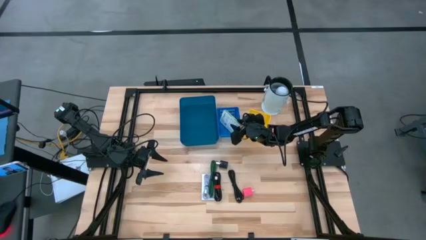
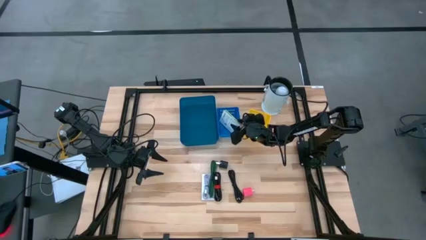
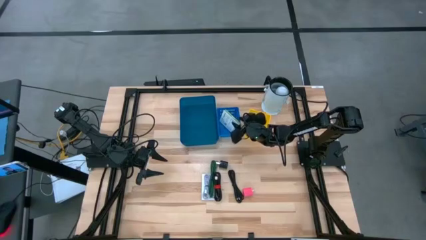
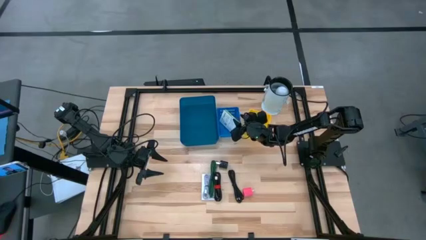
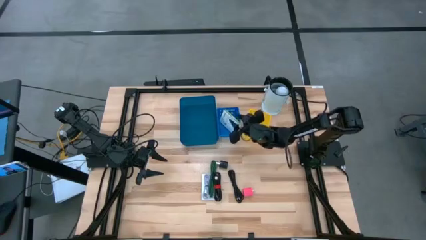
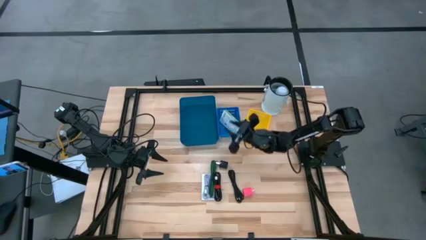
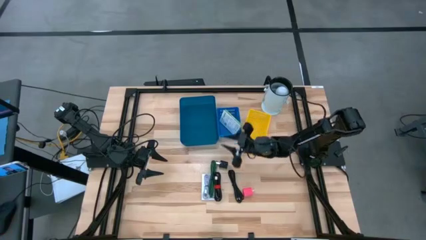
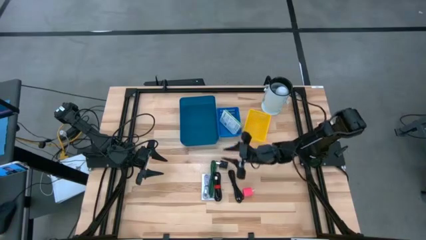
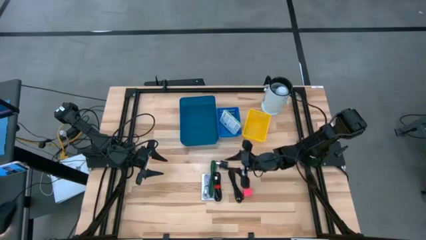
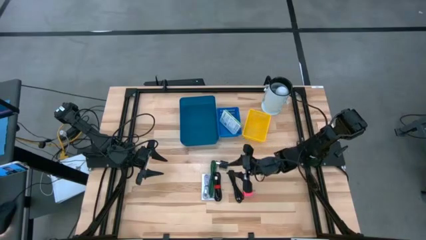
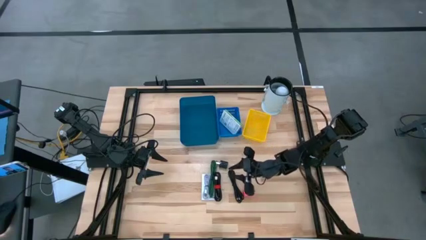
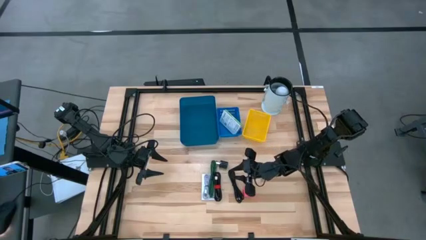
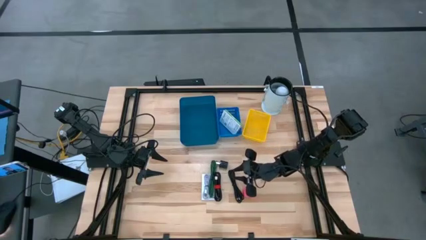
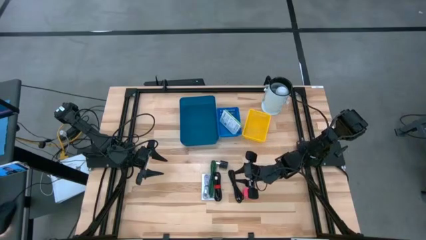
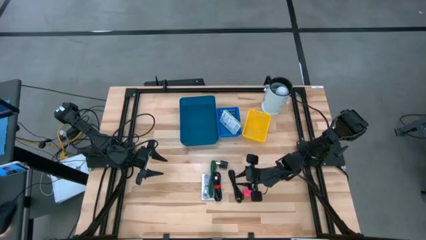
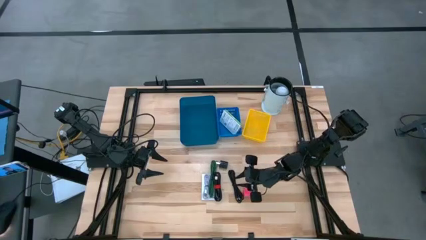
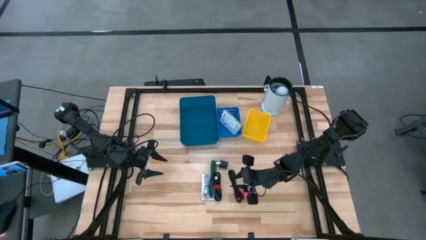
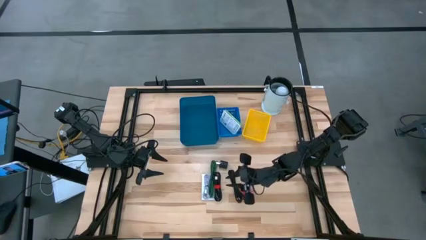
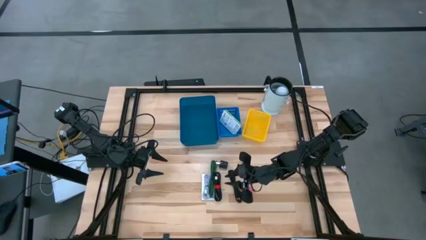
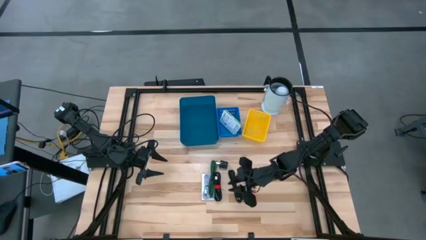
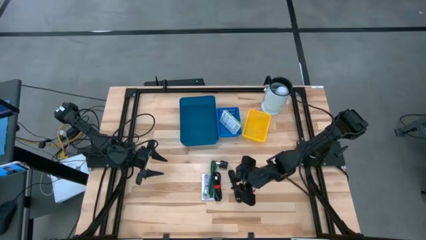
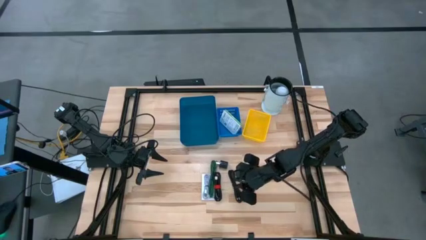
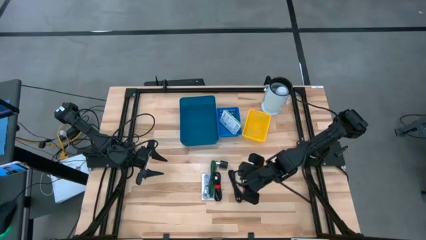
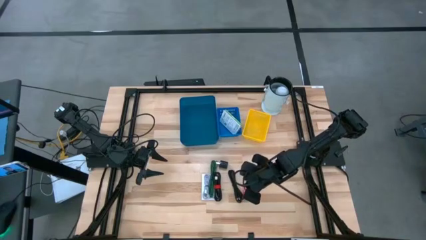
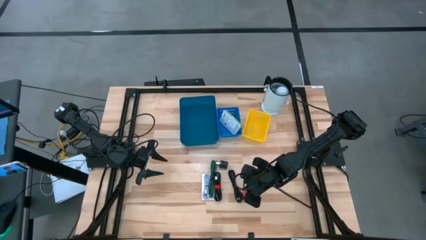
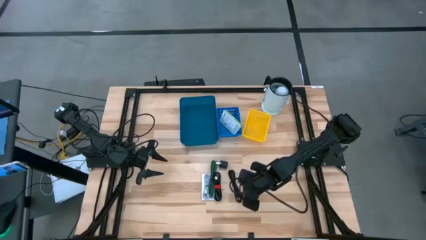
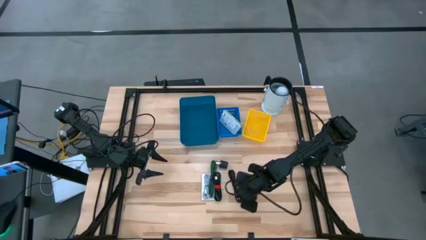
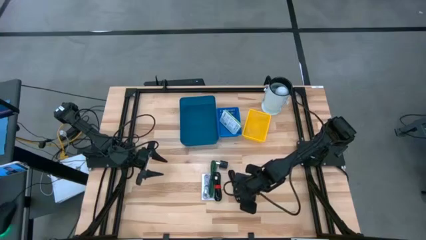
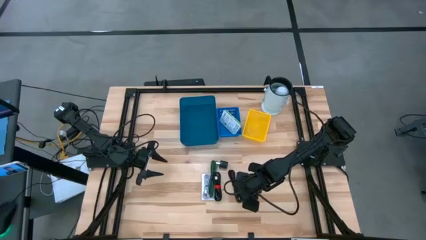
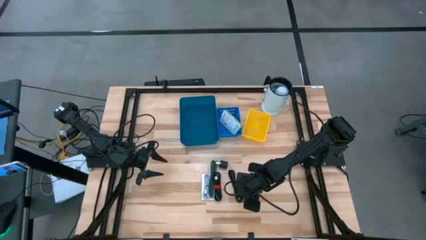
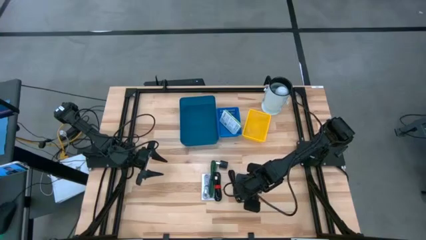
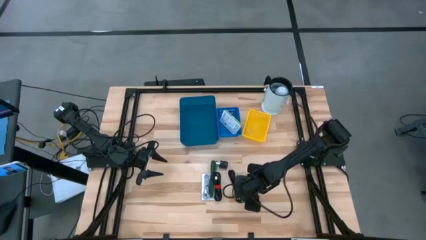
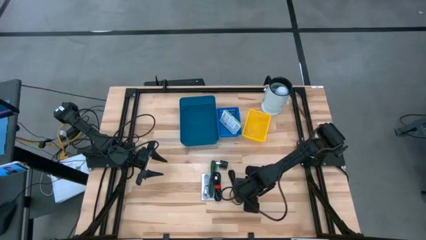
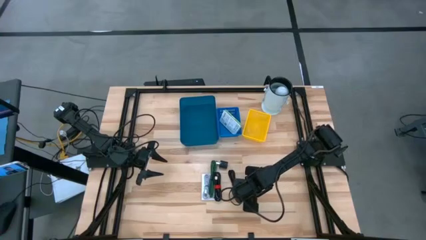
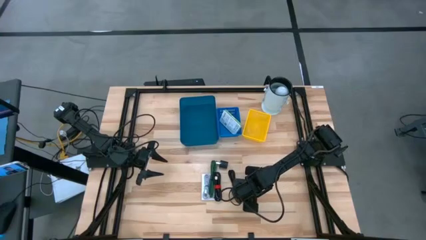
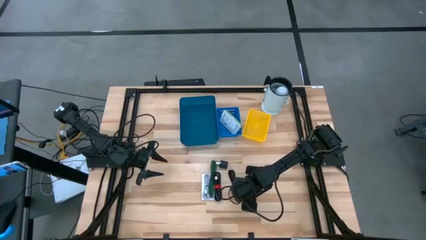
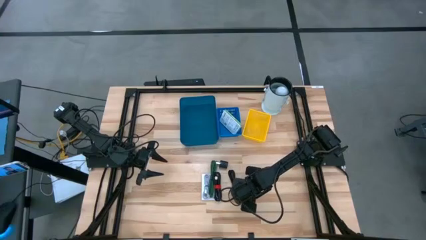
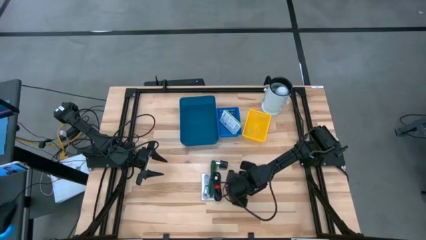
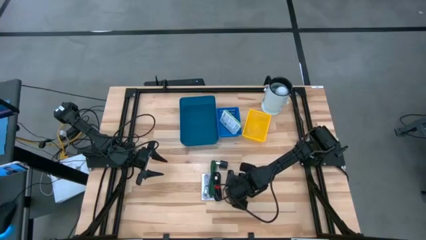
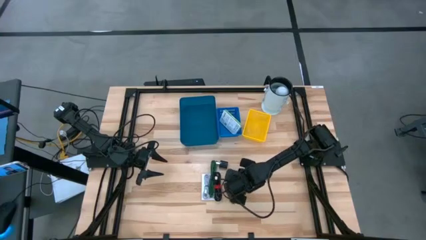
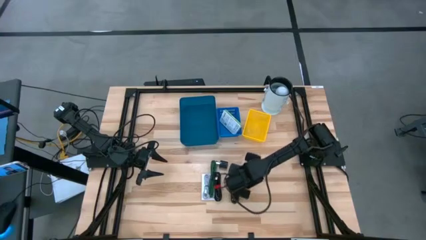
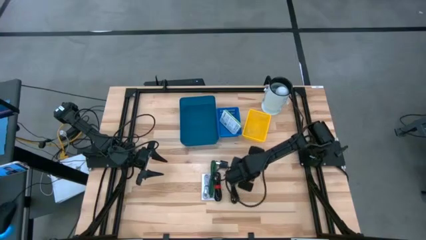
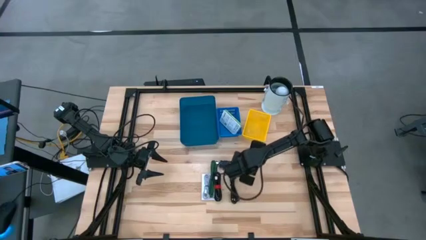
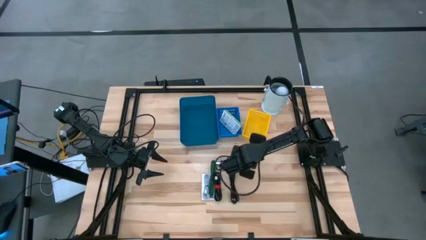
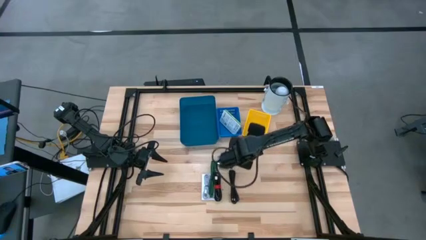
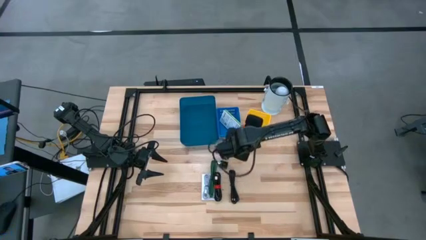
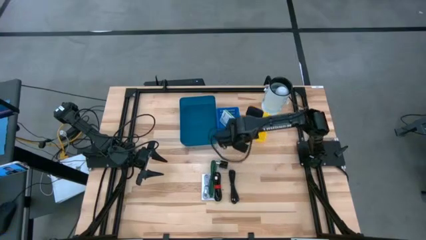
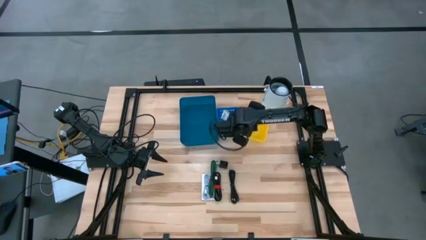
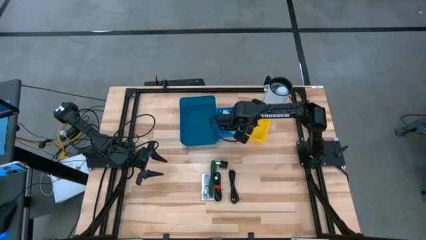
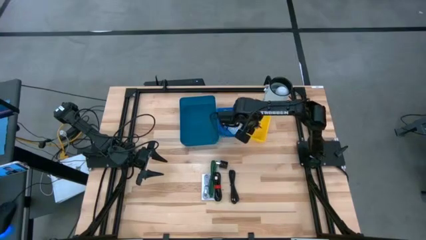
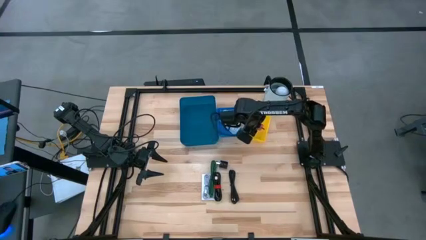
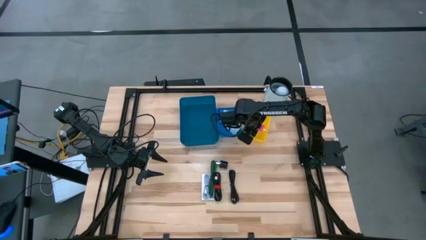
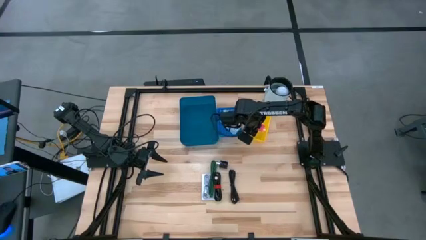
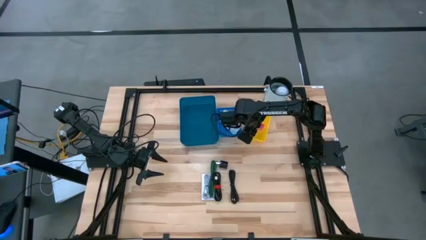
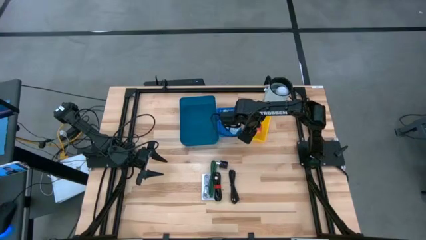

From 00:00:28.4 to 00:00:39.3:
Task: Pick and place items into bin
Put the pink charger adapter into the yellow bin

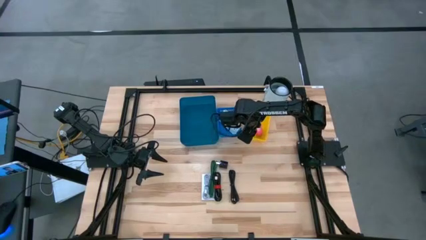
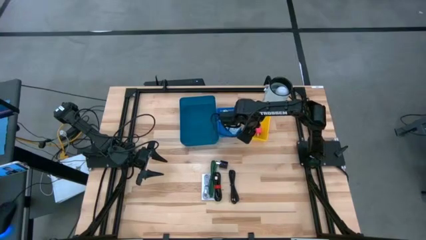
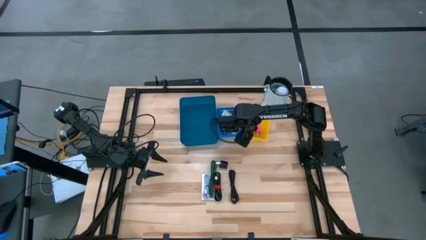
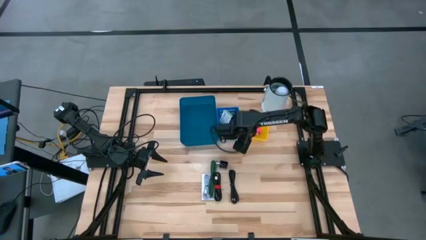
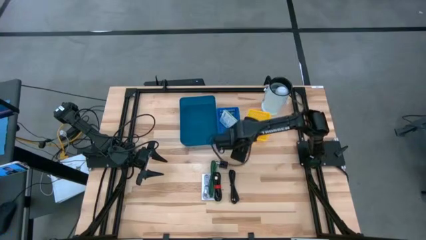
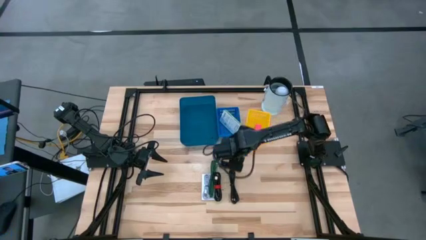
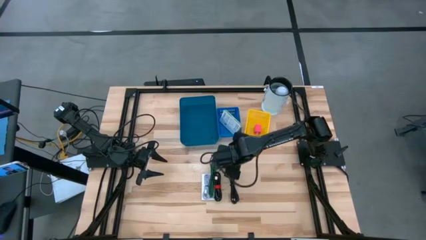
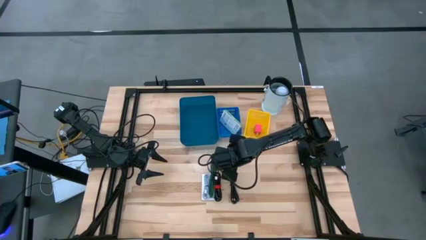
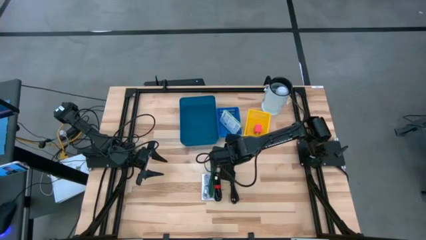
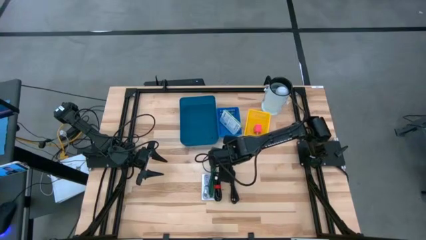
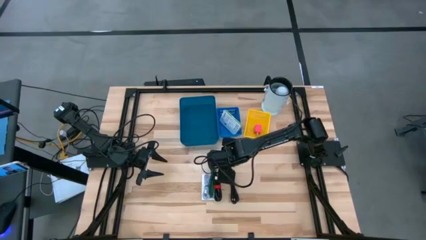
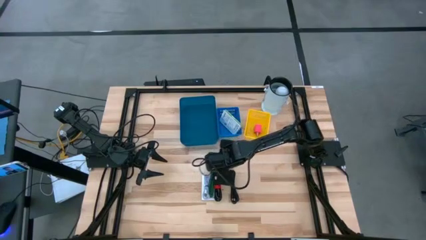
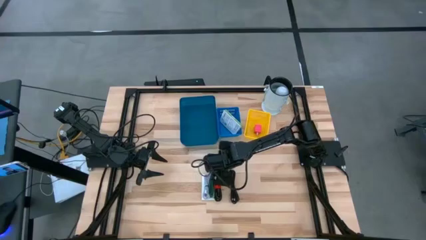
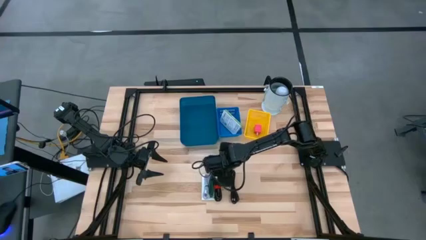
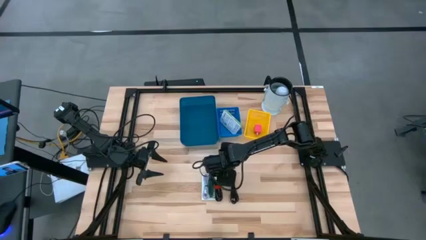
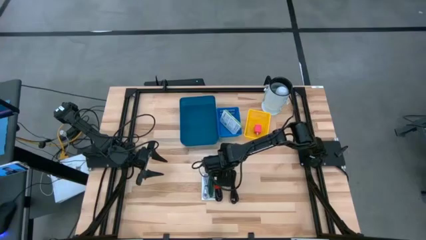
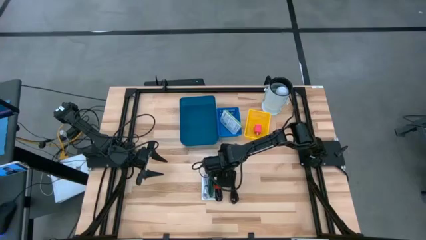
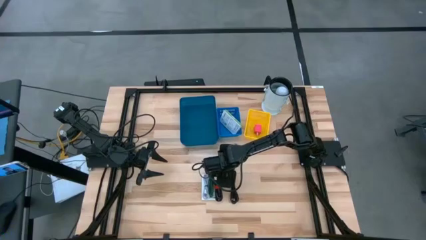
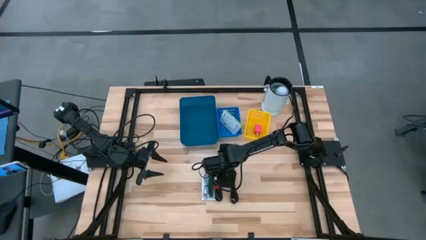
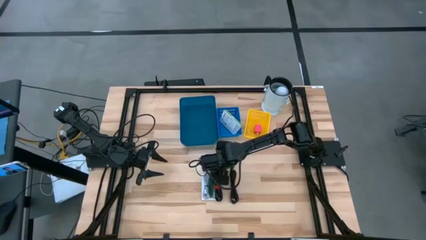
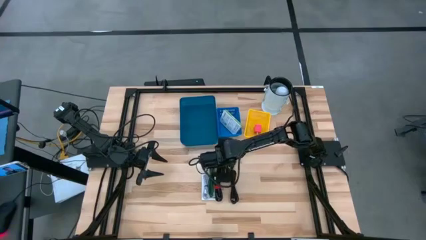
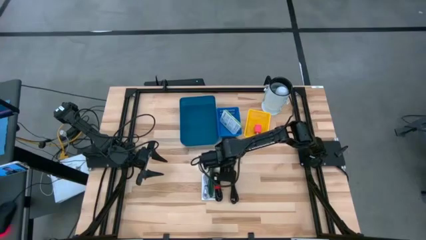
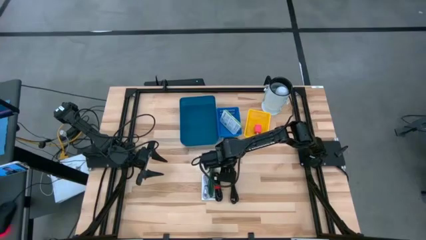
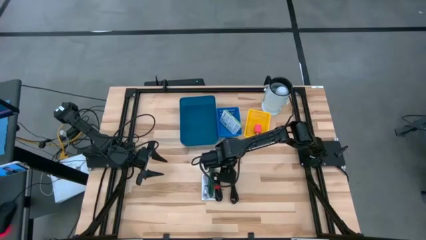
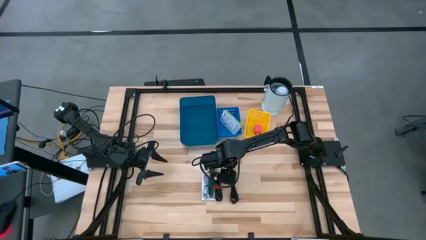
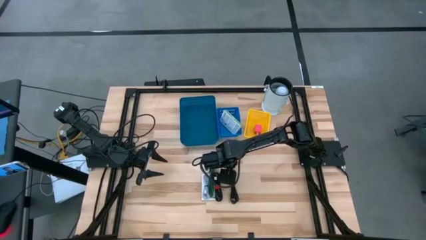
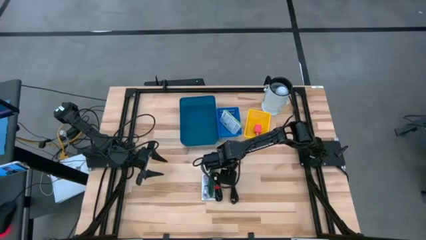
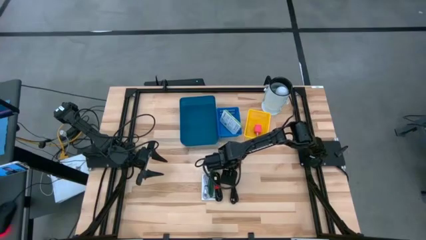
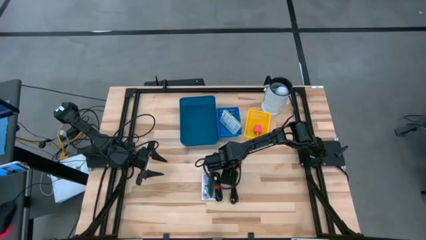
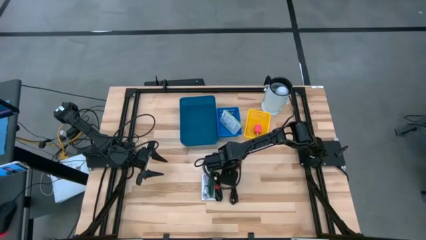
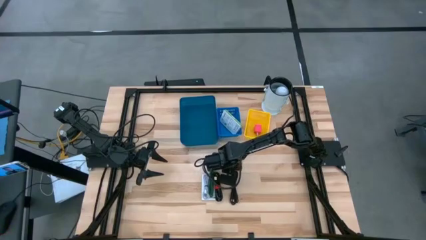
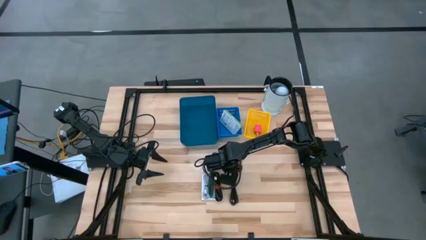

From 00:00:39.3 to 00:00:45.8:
Put the black charger adapter into the yellow bin
